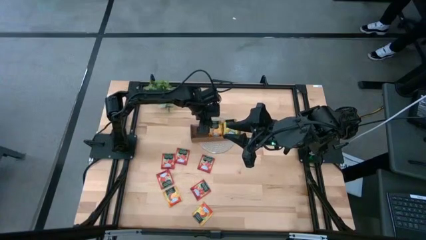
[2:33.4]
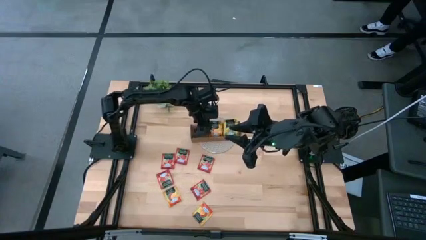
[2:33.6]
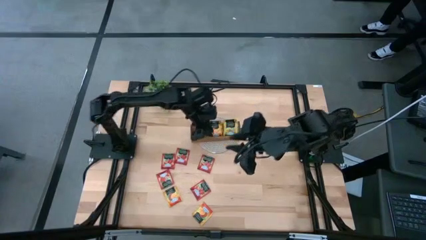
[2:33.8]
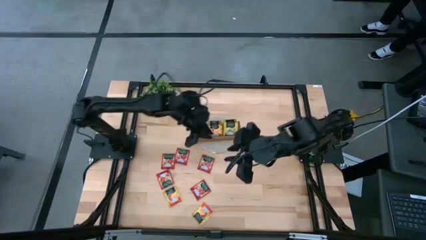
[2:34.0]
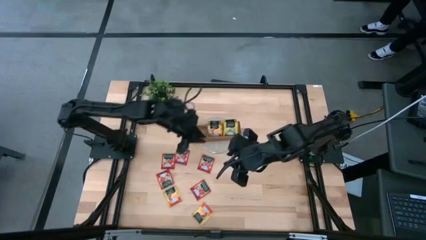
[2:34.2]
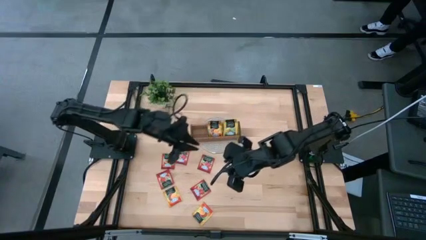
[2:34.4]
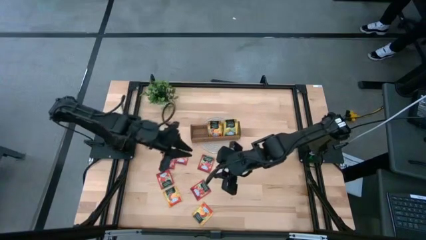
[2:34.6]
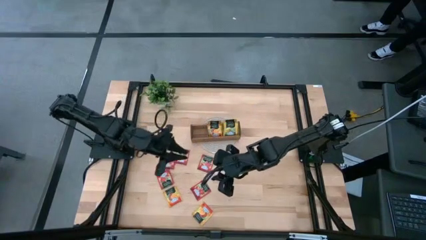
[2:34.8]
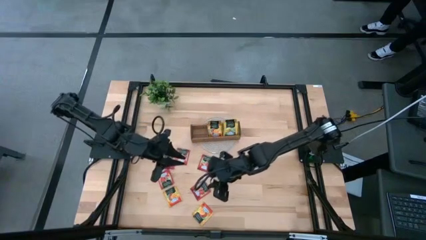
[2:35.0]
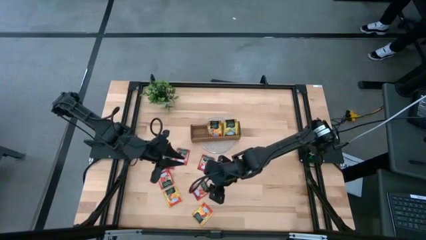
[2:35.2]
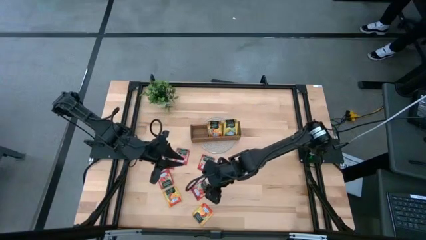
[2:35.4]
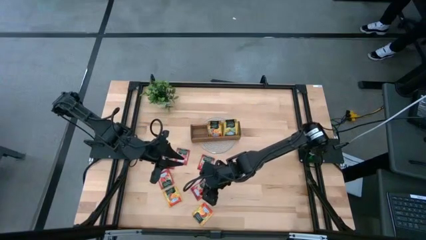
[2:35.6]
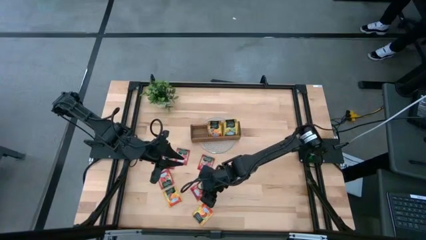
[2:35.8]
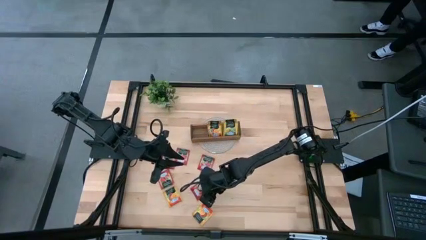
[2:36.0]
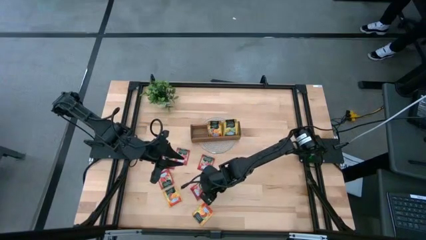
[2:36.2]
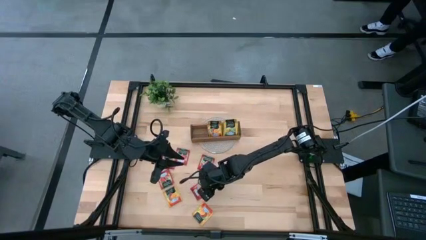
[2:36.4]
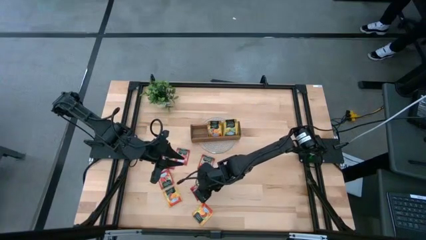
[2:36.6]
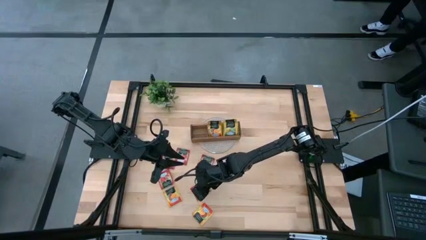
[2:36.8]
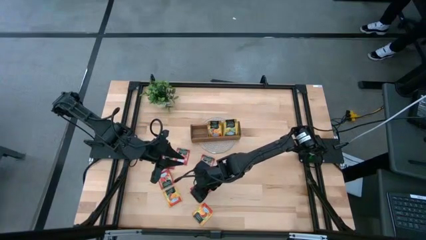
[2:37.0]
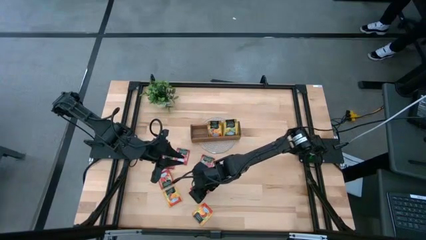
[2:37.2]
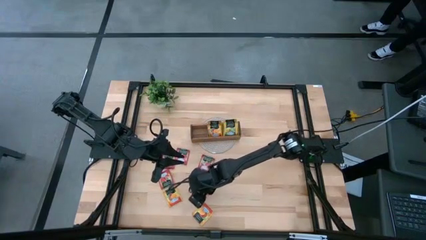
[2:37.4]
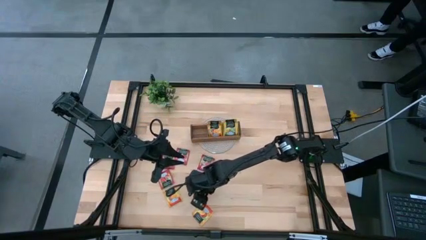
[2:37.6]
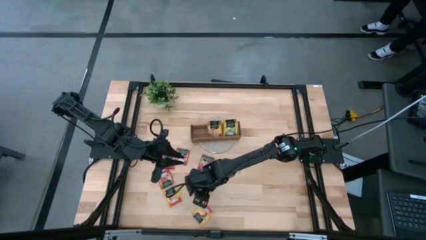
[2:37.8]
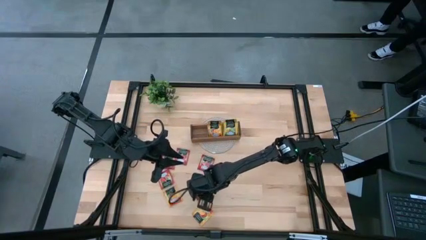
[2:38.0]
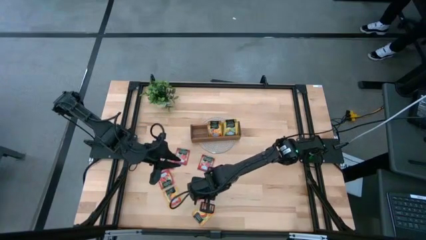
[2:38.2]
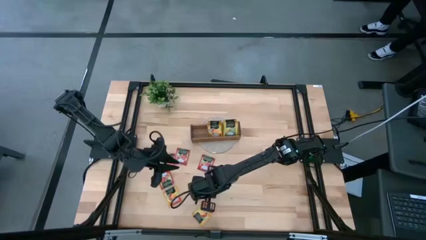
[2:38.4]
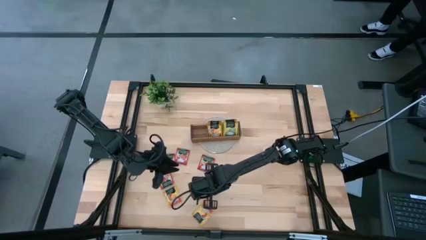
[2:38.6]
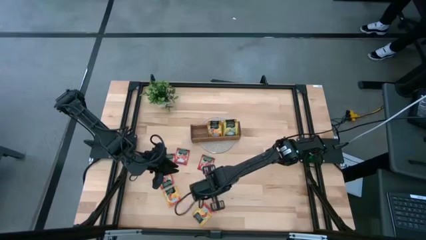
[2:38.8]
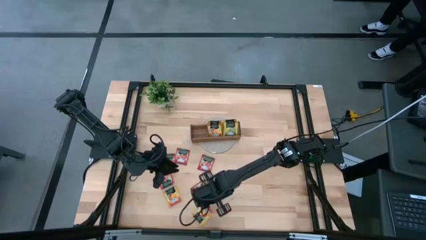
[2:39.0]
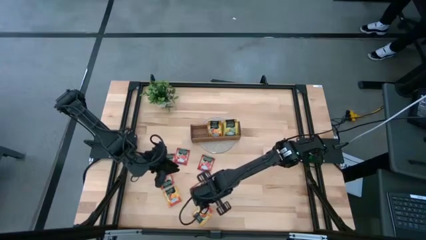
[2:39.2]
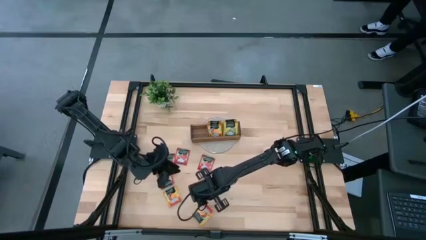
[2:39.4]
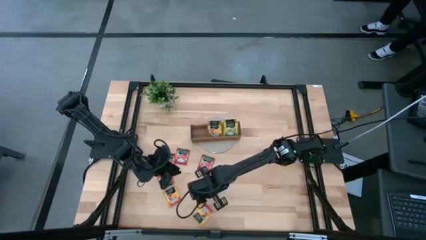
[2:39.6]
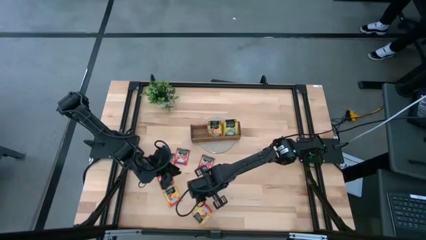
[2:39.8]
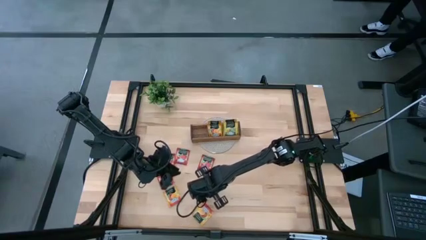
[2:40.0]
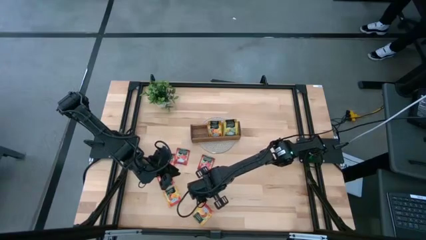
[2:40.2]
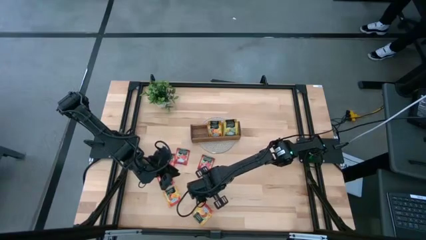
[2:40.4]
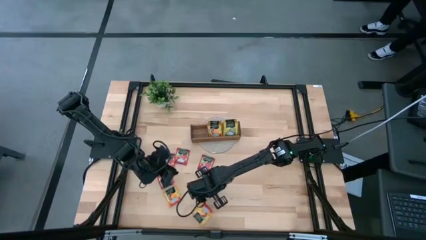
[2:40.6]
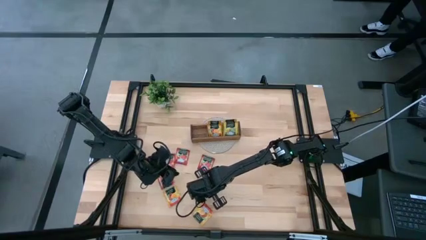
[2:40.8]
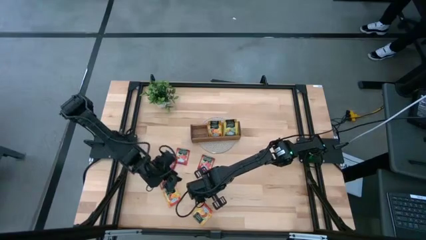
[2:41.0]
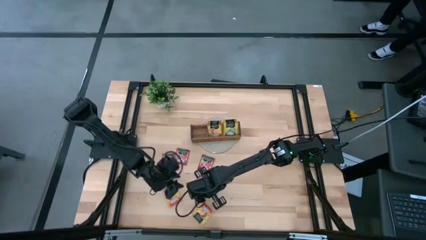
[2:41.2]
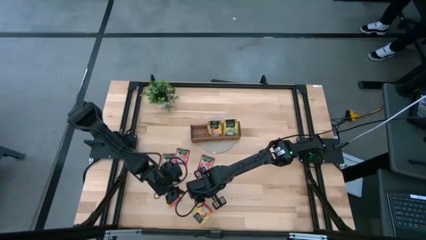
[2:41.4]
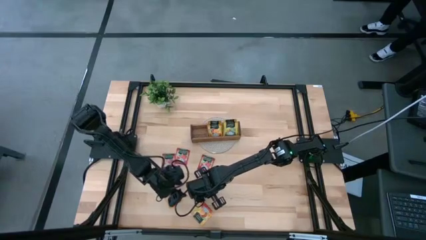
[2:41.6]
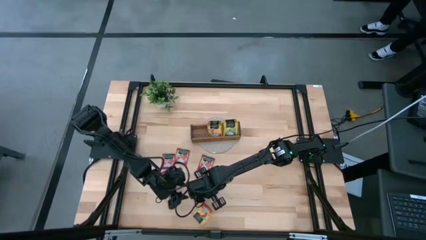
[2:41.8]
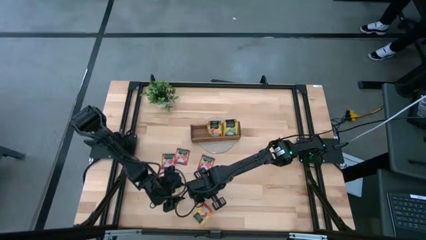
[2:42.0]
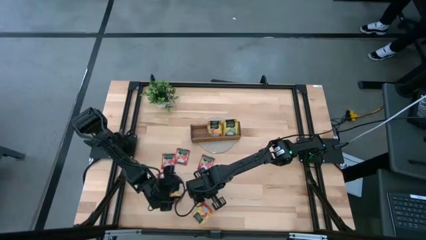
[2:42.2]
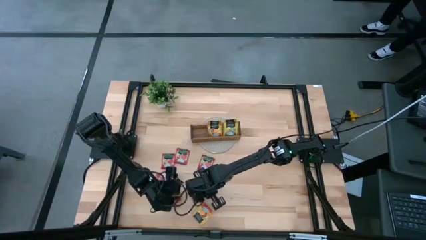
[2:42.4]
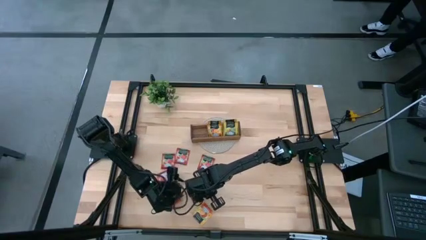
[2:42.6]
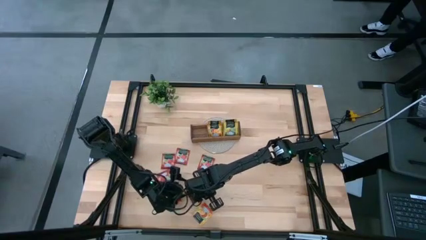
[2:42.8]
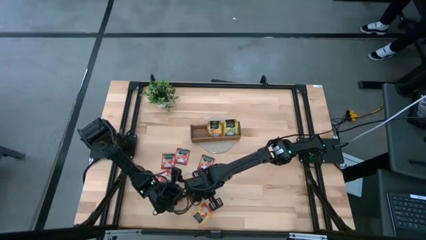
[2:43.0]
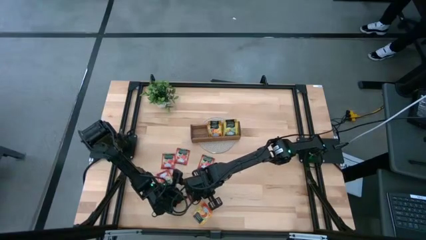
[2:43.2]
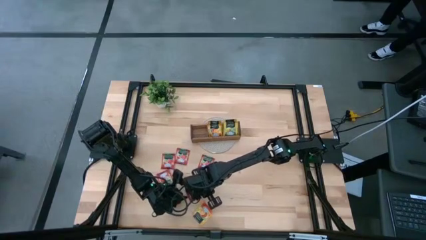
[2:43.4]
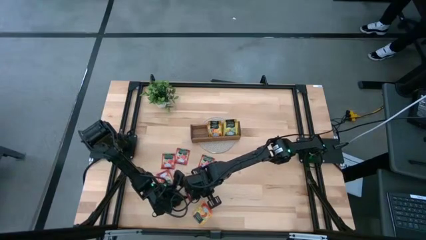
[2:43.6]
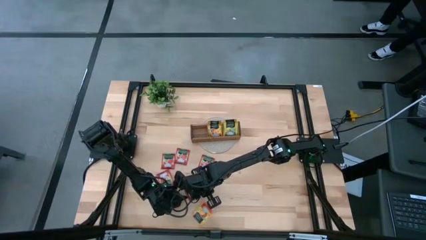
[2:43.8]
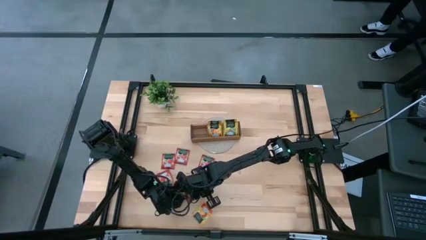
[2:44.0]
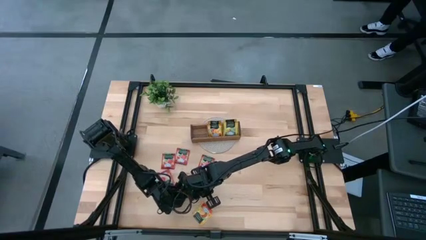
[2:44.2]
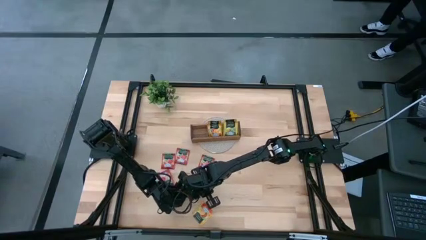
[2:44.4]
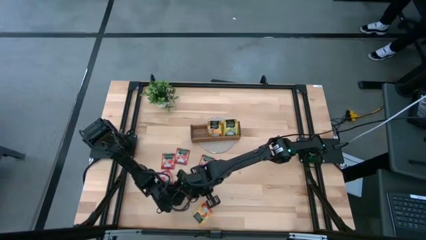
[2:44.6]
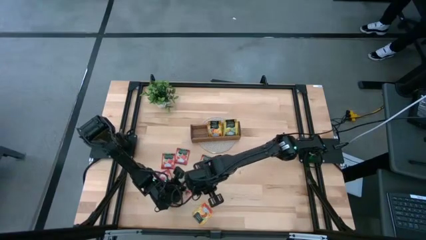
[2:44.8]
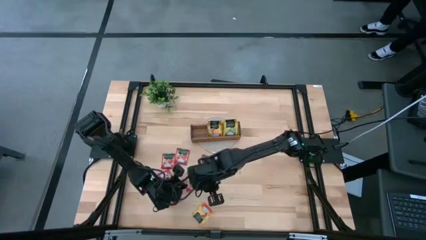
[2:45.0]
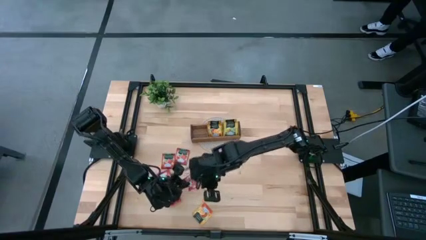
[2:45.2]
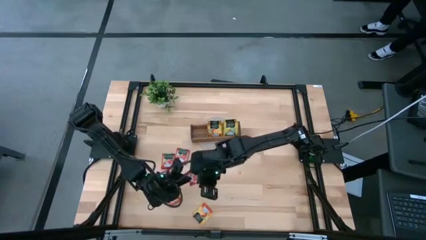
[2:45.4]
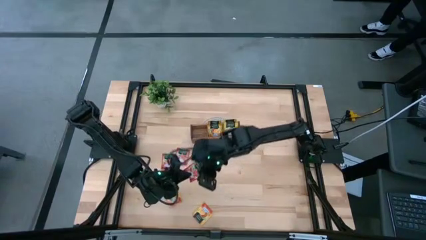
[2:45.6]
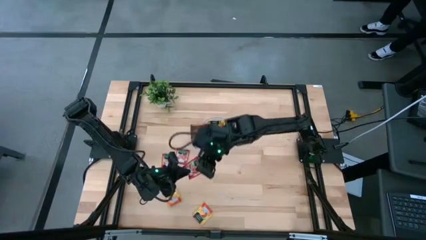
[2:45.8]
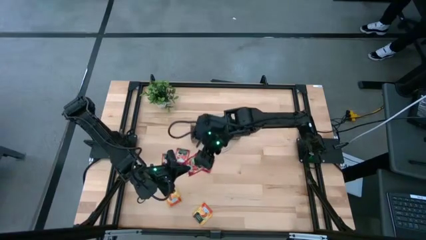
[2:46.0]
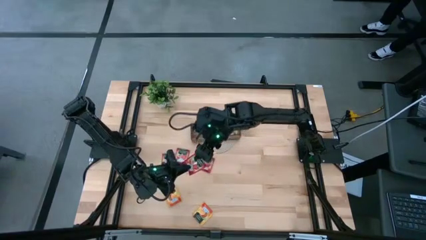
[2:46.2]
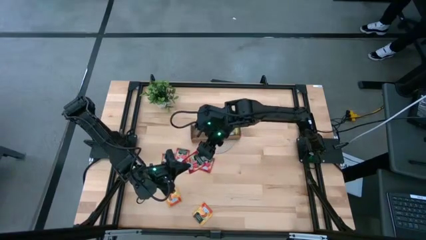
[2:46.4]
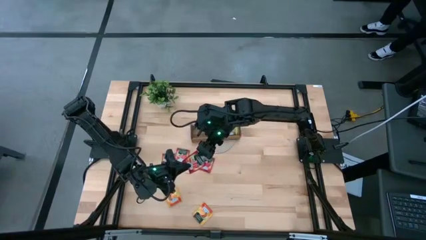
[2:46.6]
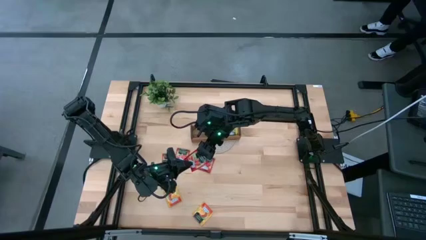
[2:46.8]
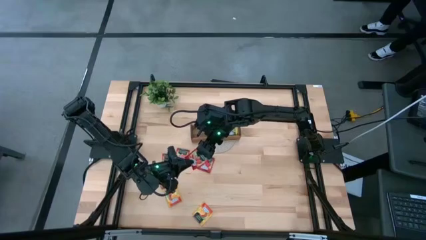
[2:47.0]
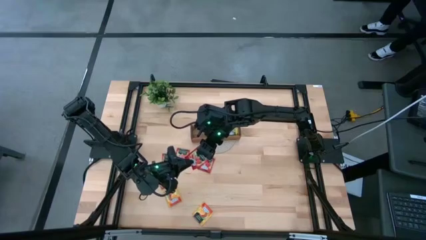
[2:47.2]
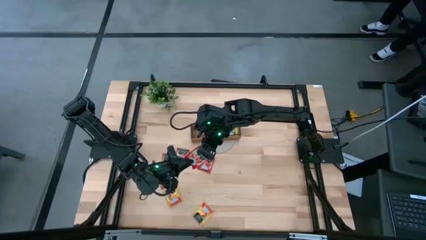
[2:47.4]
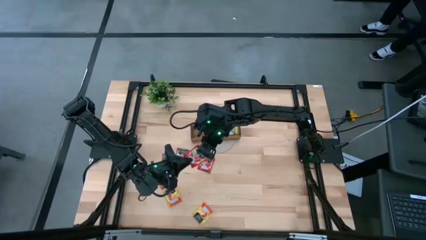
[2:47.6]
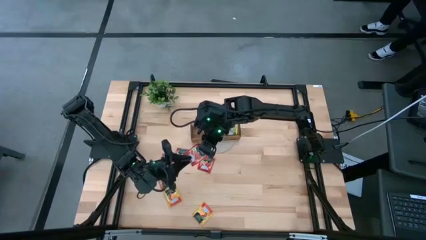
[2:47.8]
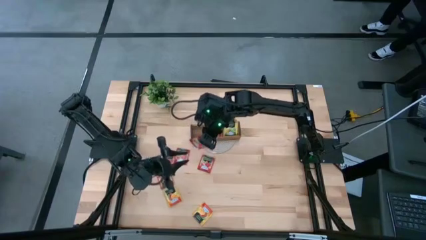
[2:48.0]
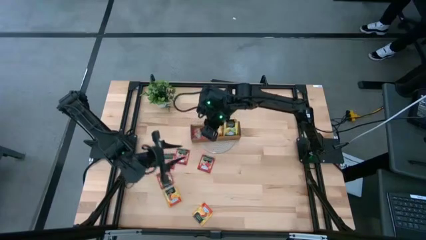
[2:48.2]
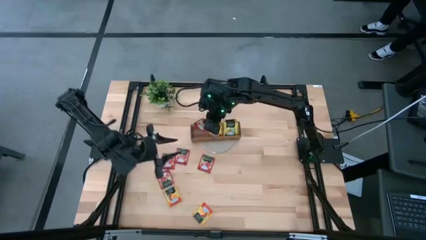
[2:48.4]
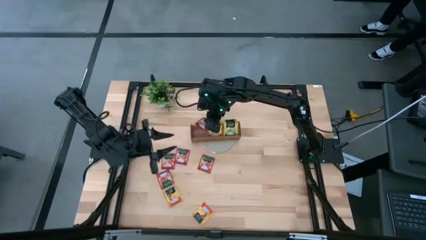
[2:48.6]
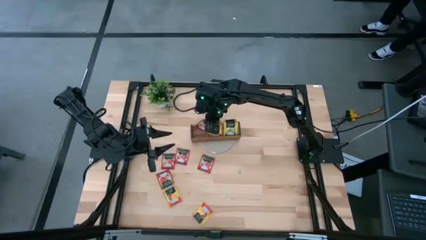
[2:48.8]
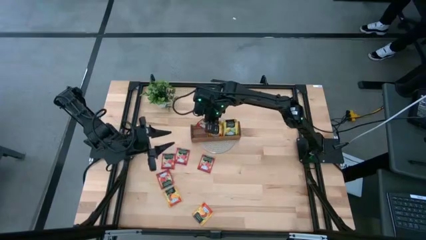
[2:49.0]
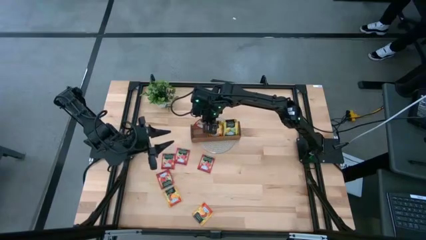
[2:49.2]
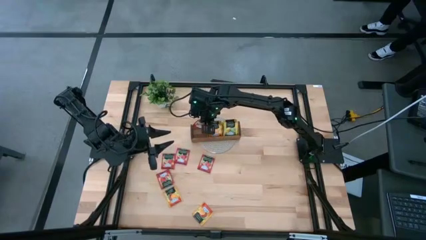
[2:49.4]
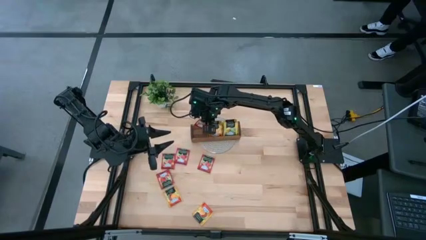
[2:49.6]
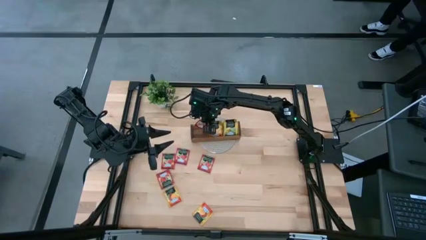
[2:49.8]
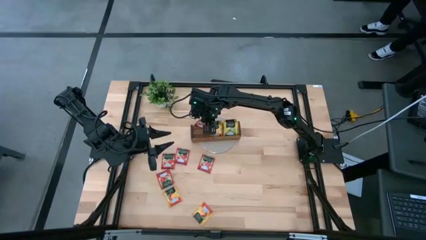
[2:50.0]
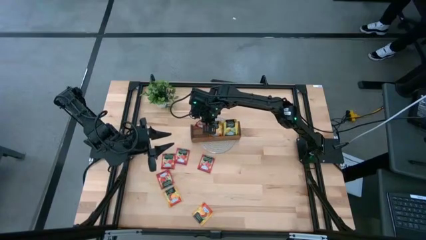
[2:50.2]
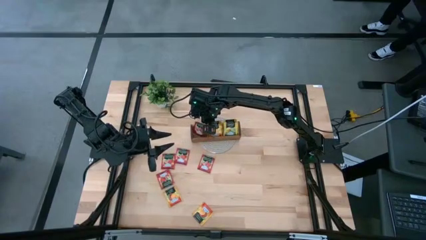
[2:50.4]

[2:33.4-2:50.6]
Task: Pick & Place Tea
Put the red tea bag into the left section of the wooden organizer
